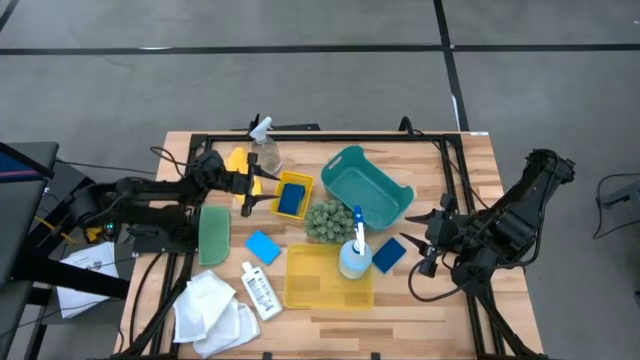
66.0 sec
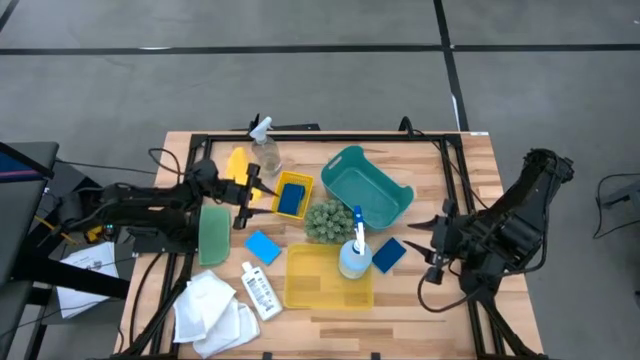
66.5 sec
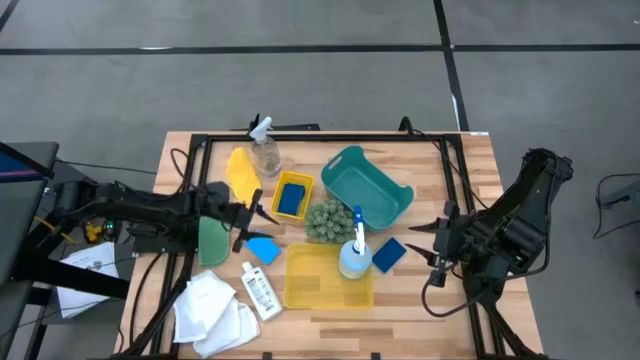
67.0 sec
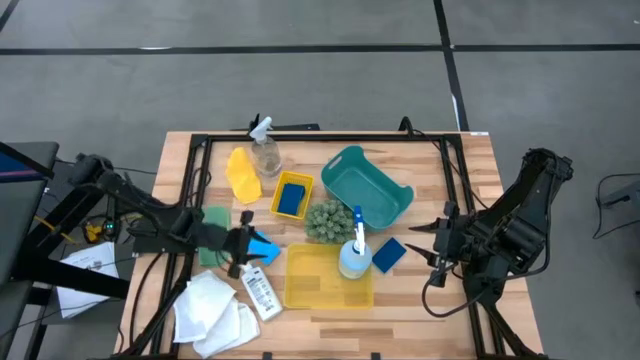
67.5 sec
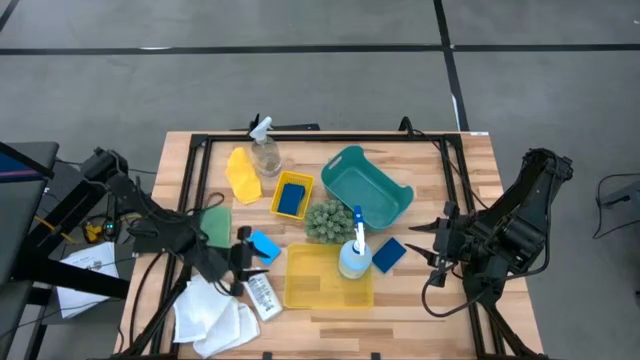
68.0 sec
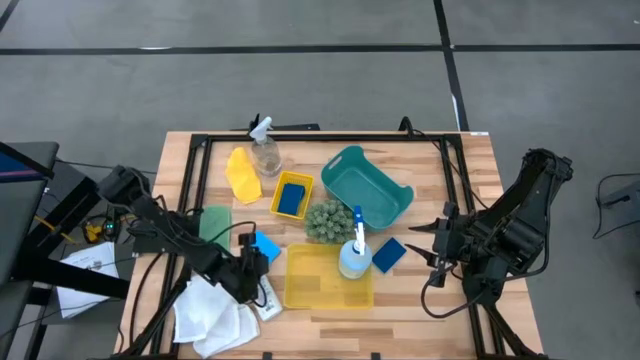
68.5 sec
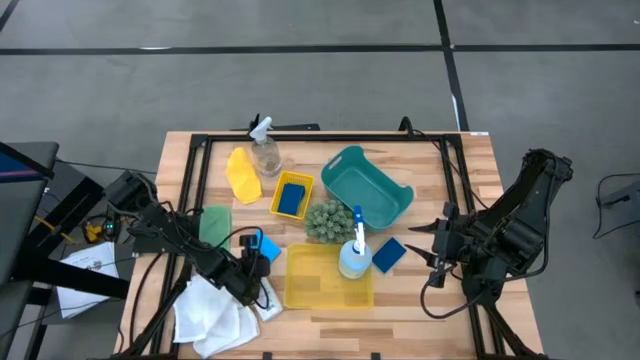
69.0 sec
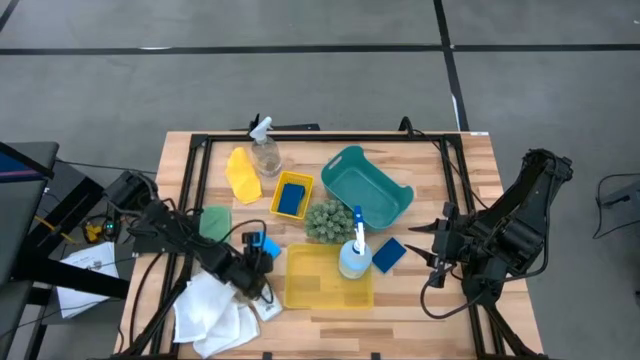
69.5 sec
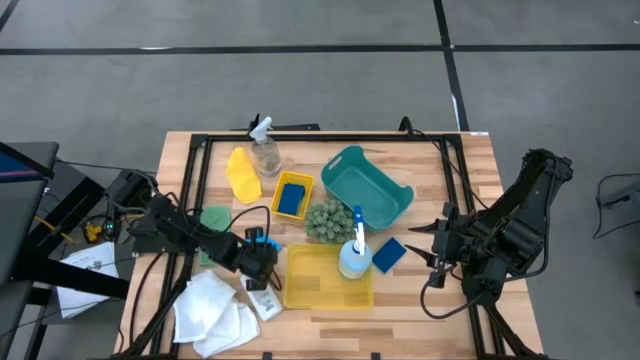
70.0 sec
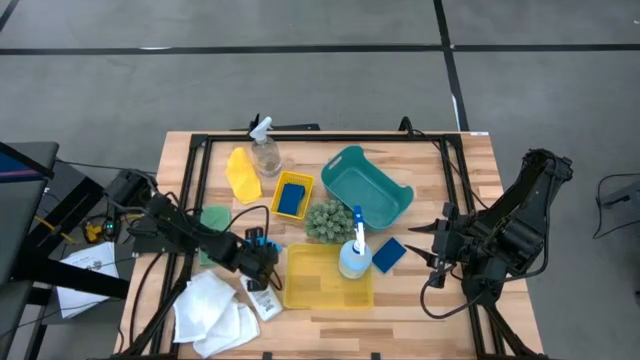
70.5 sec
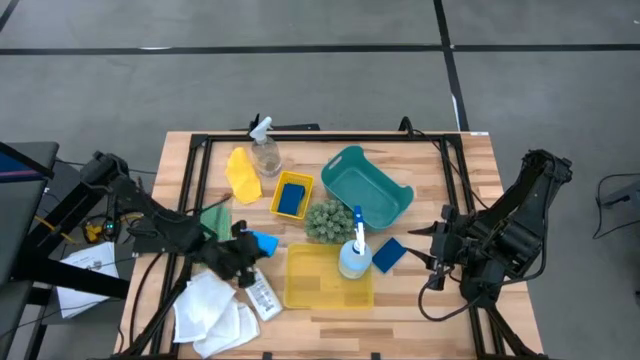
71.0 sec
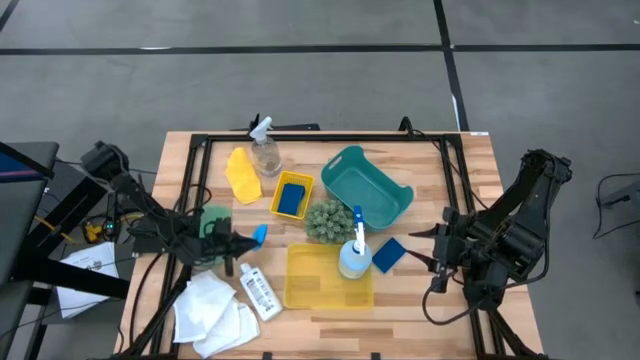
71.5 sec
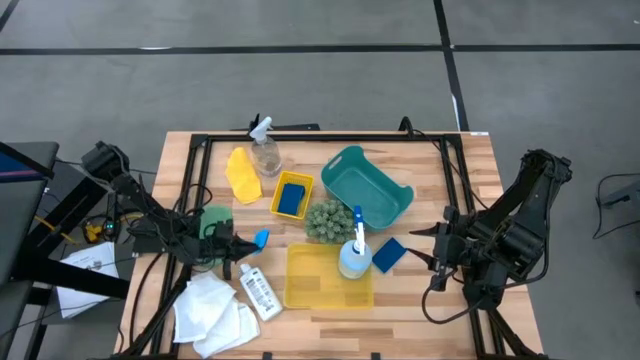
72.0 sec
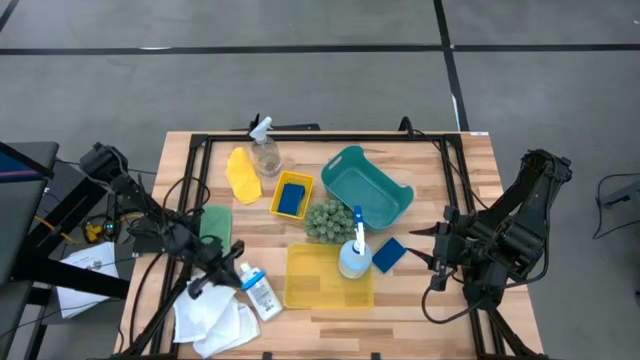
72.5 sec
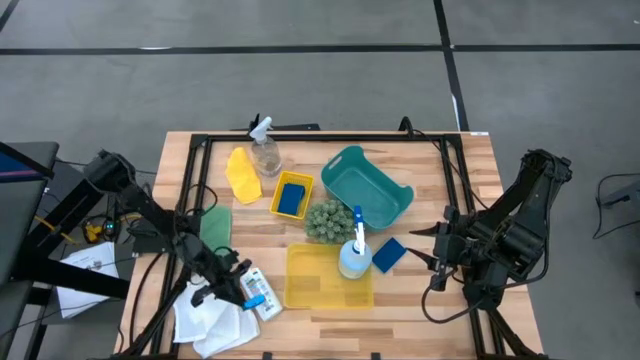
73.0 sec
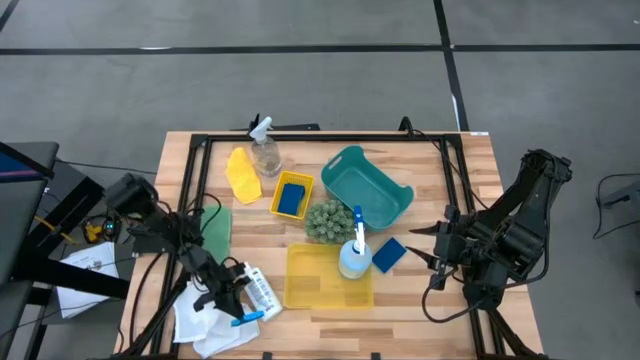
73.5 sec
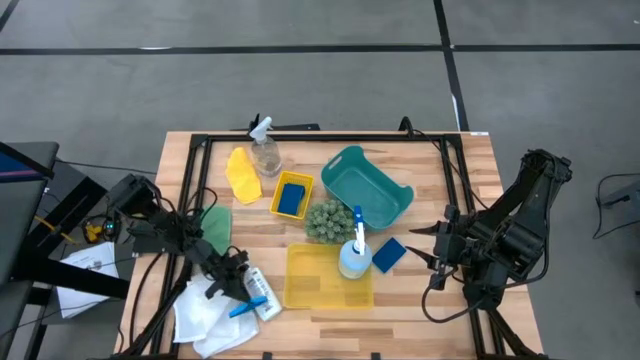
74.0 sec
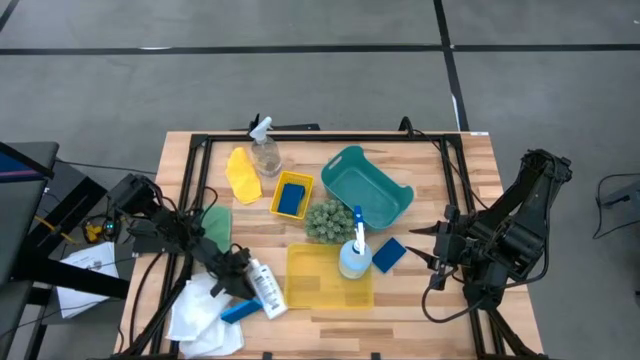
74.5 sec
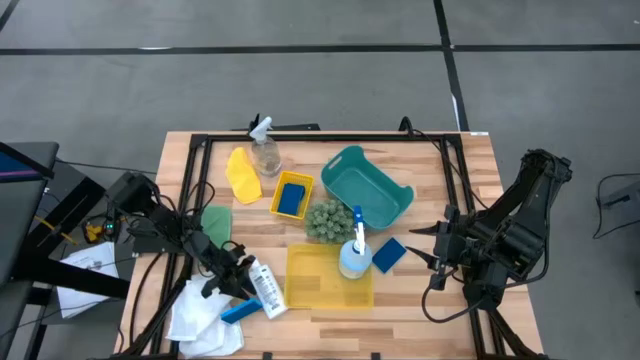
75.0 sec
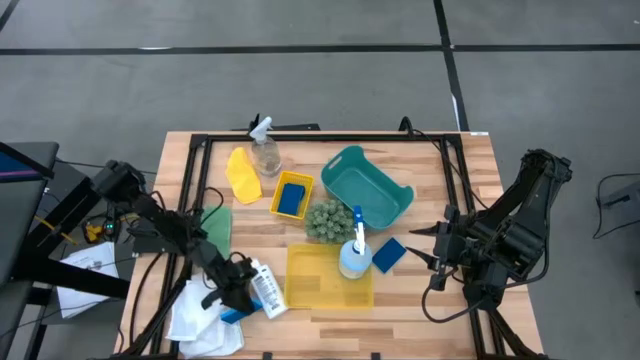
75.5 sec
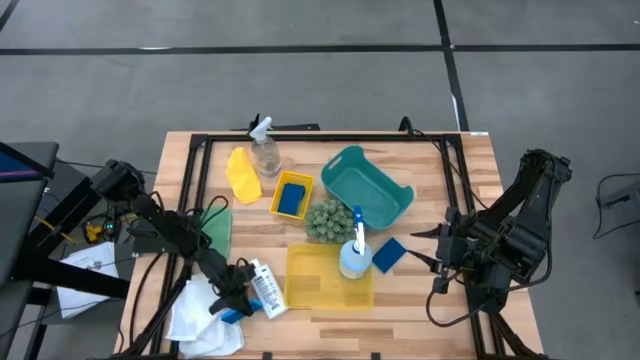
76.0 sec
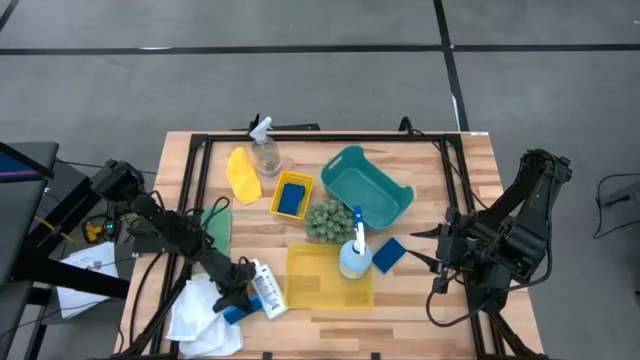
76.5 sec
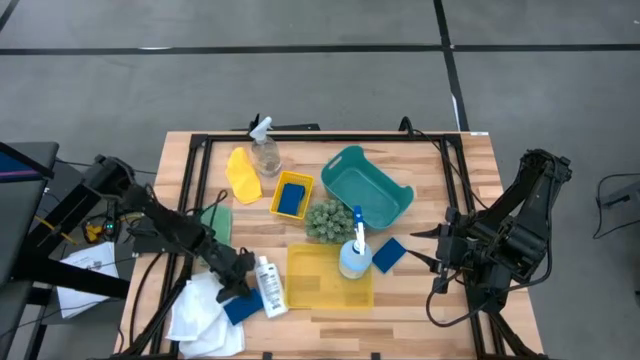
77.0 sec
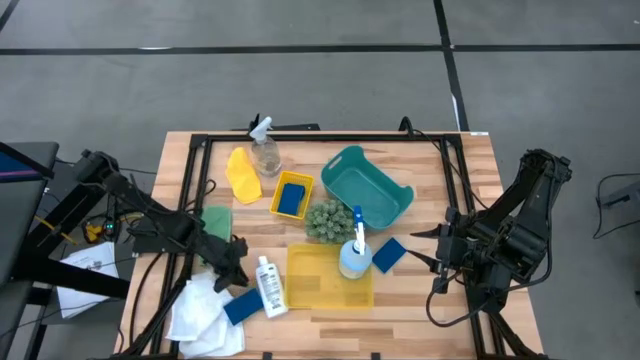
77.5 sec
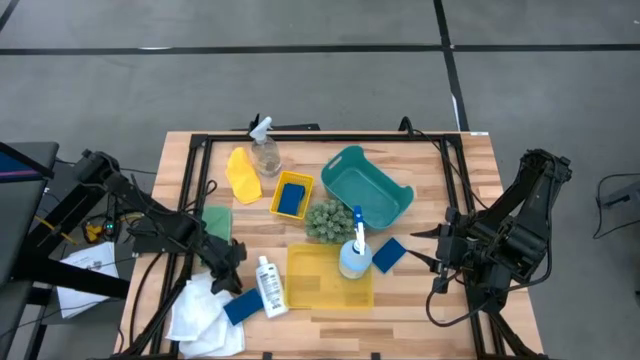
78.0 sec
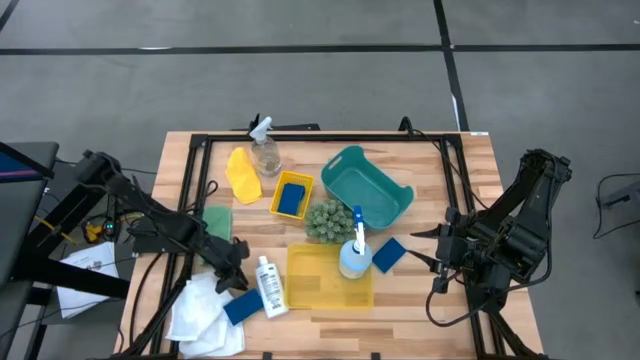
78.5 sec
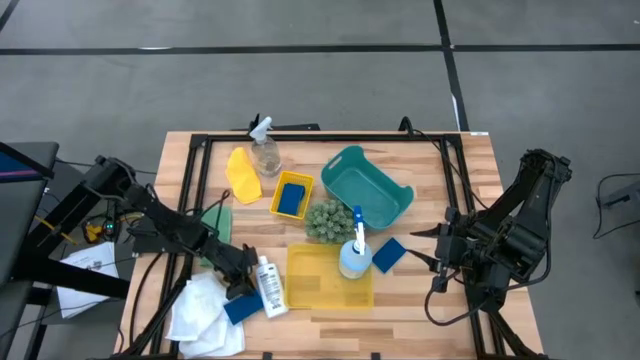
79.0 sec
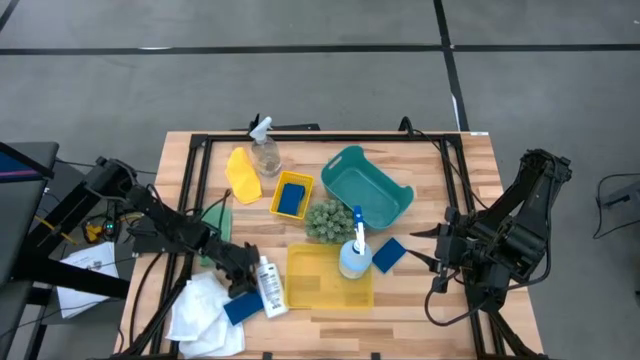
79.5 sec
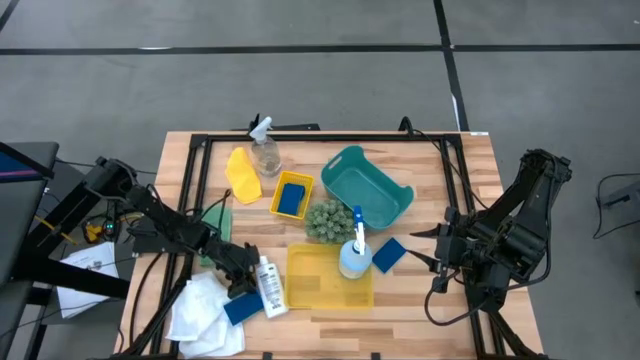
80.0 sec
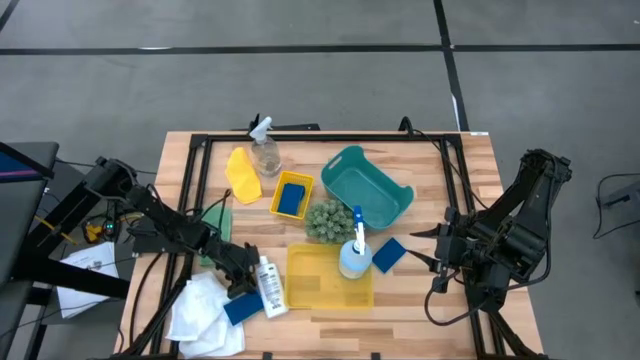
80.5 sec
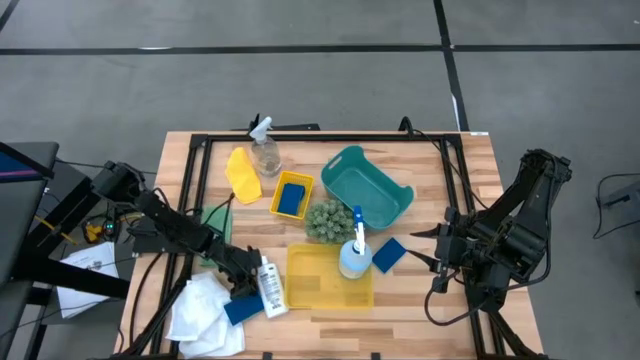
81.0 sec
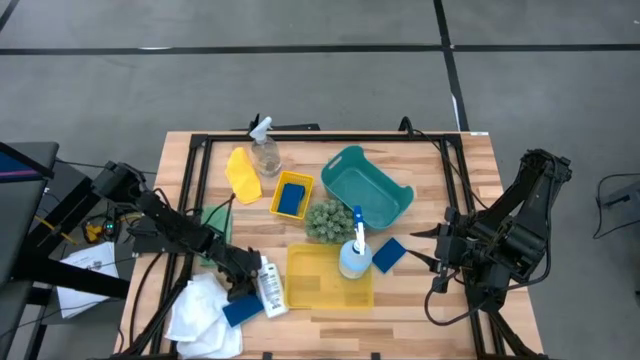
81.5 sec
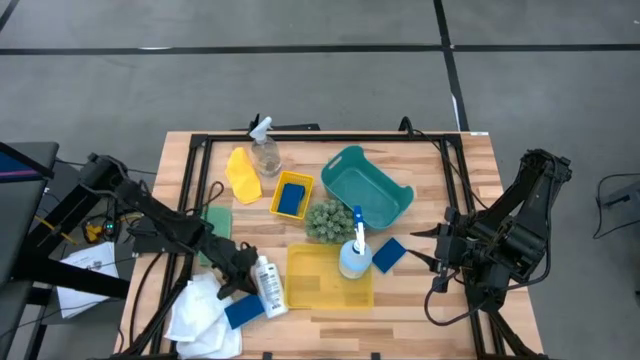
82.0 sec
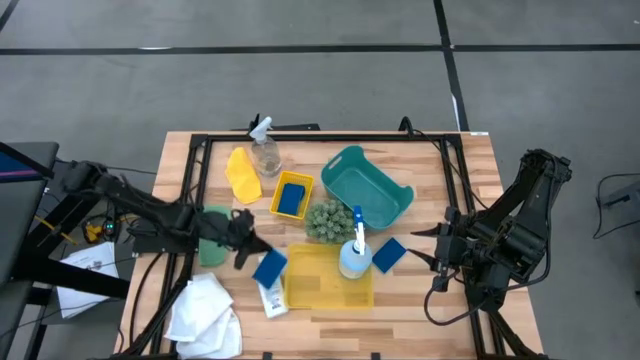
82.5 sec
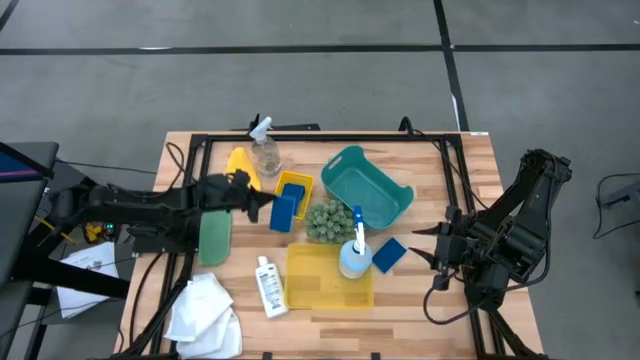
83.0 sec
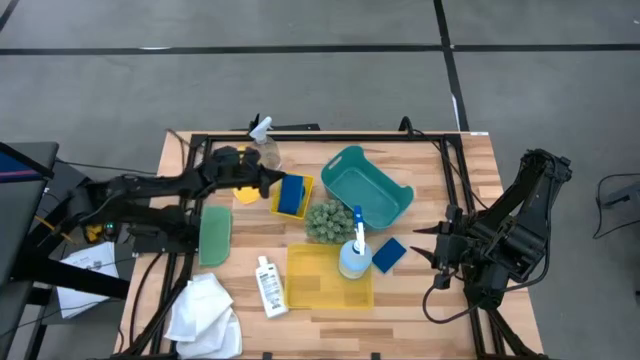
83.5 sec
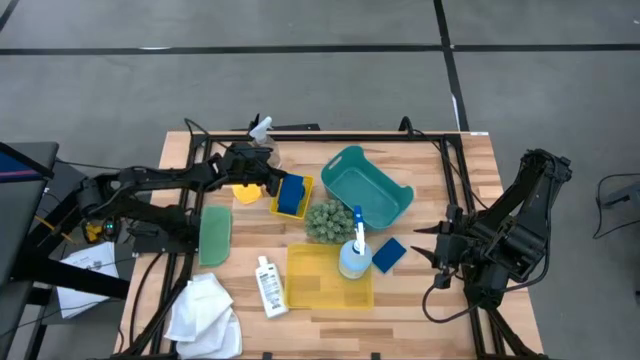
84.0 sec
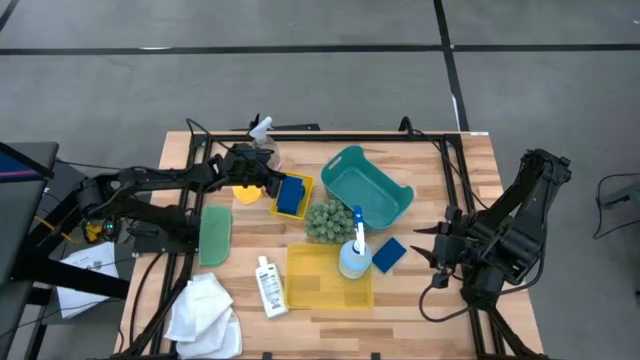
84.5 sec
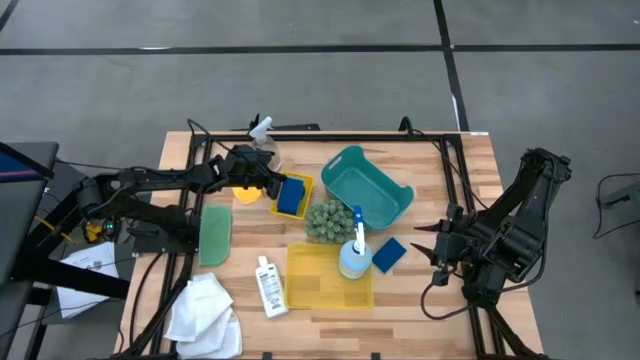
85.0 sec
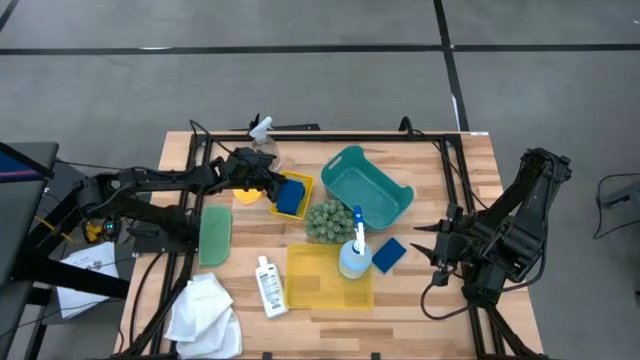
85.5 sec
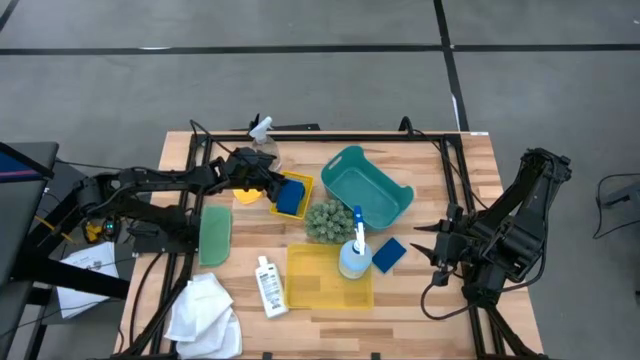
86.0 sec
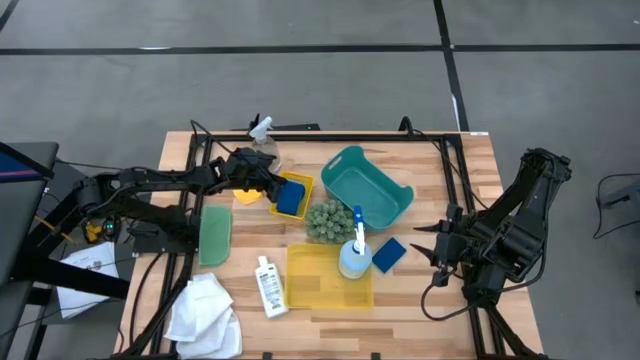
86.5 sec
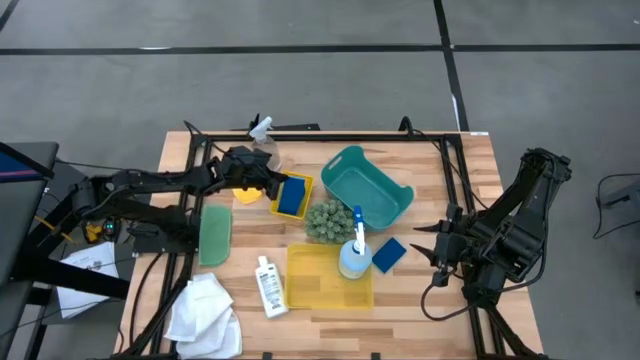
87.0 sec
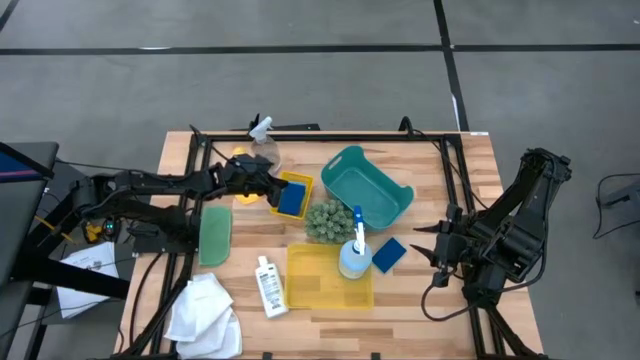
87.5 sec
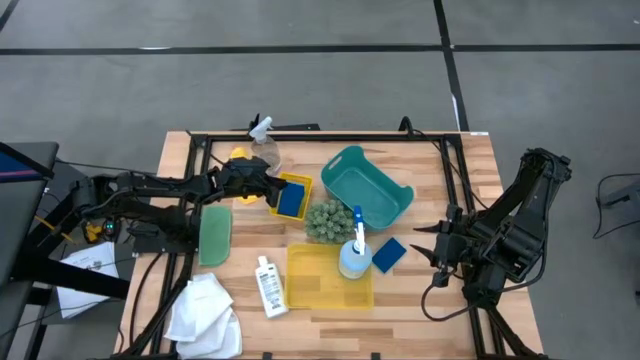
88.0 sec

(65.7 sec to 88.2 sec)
Task: Pick & Place Kitchen Items
Put the blue sponge into the top yellow bin
